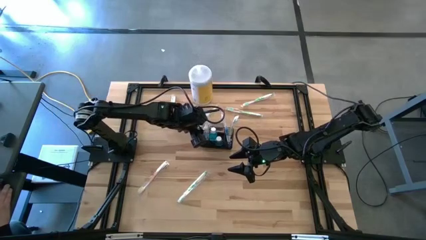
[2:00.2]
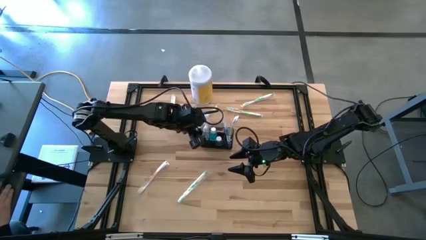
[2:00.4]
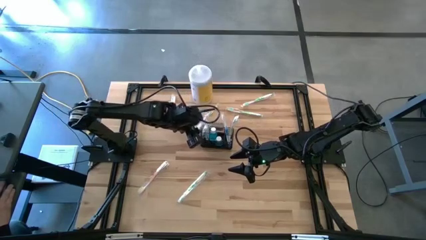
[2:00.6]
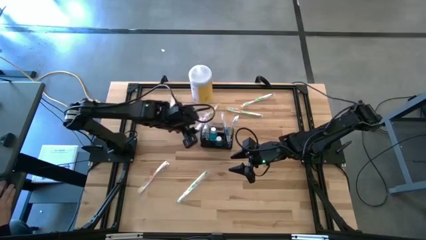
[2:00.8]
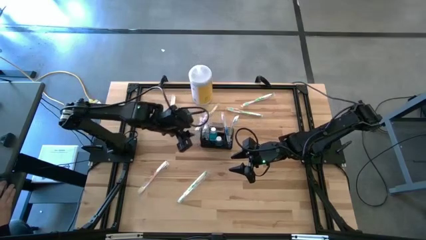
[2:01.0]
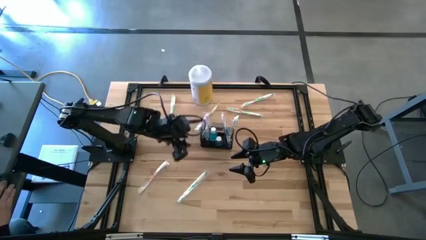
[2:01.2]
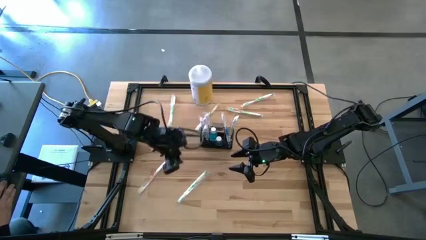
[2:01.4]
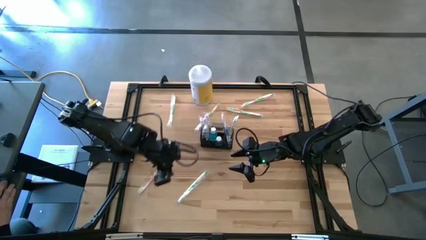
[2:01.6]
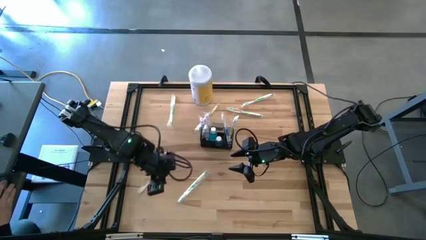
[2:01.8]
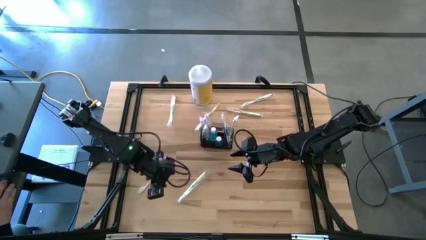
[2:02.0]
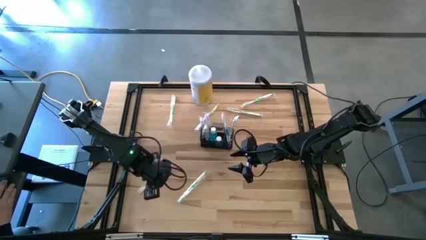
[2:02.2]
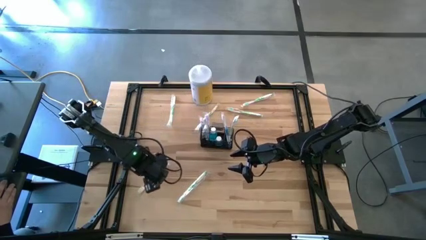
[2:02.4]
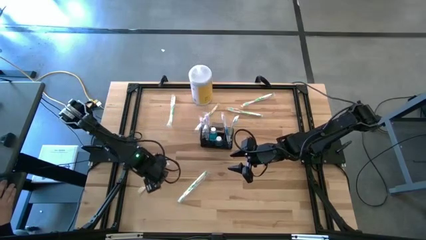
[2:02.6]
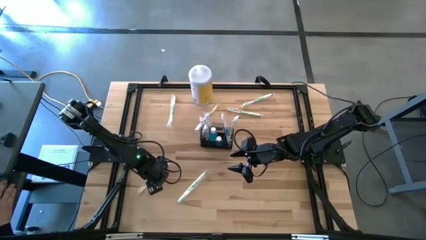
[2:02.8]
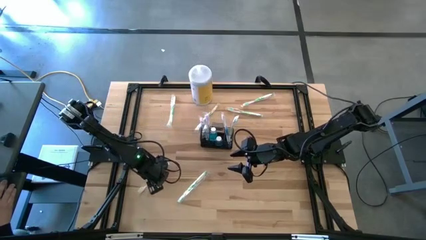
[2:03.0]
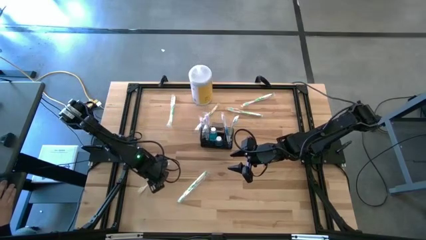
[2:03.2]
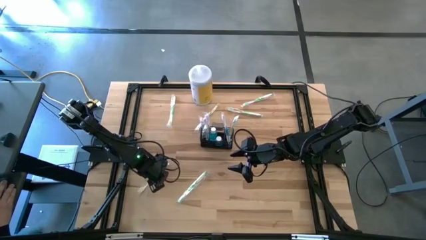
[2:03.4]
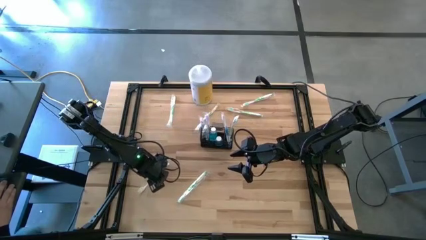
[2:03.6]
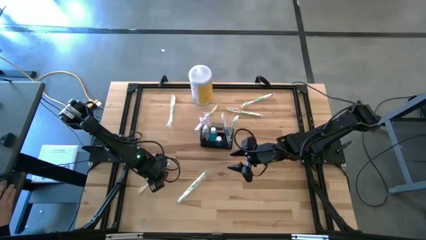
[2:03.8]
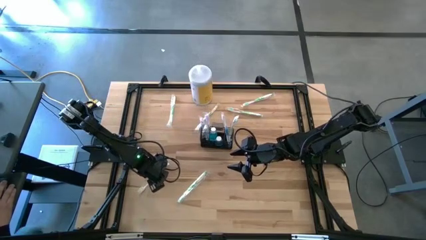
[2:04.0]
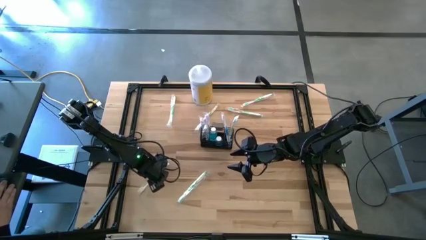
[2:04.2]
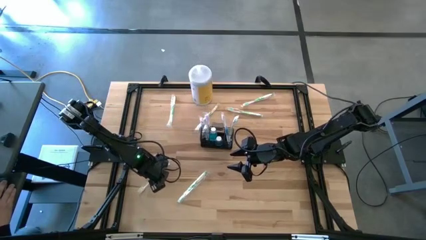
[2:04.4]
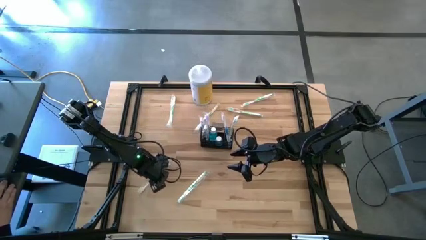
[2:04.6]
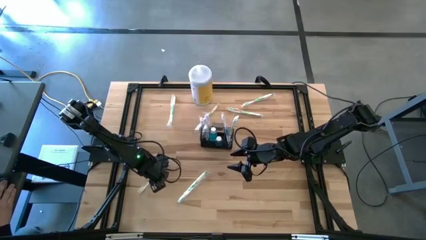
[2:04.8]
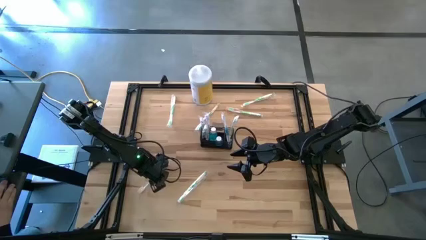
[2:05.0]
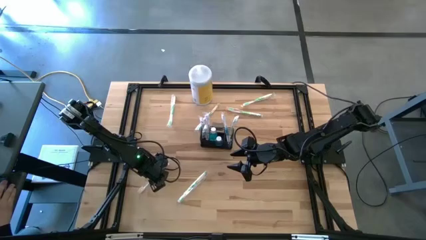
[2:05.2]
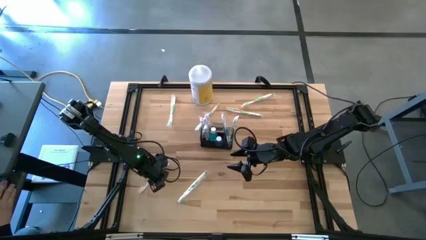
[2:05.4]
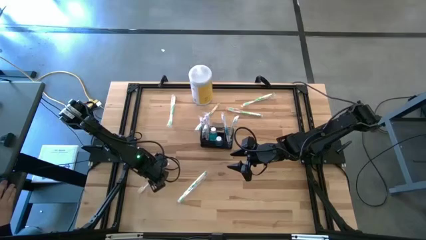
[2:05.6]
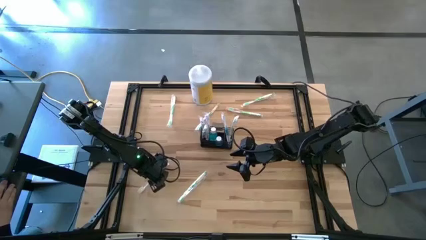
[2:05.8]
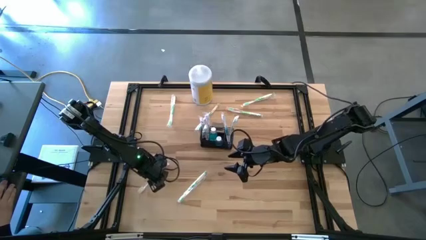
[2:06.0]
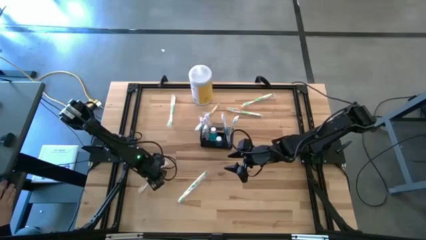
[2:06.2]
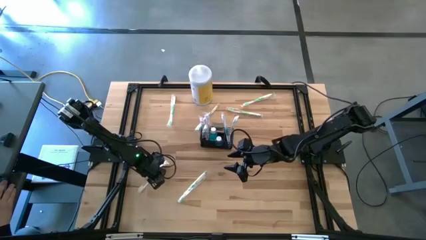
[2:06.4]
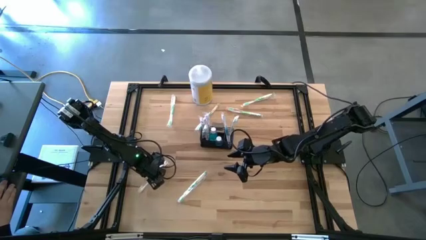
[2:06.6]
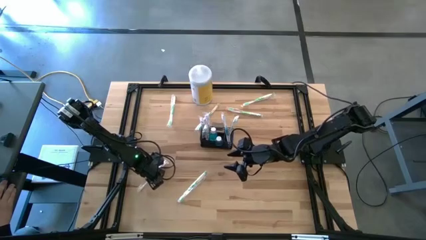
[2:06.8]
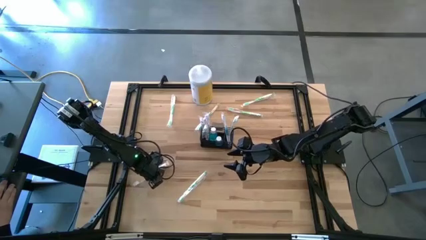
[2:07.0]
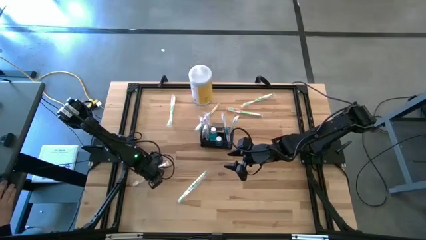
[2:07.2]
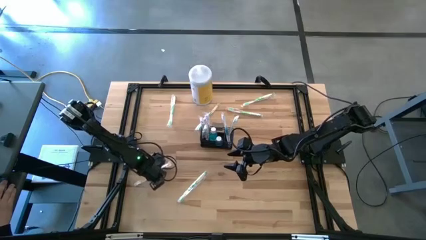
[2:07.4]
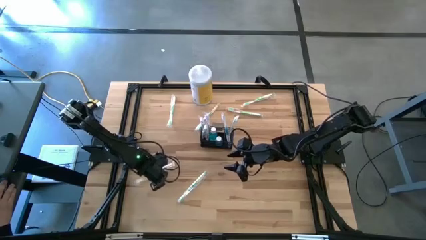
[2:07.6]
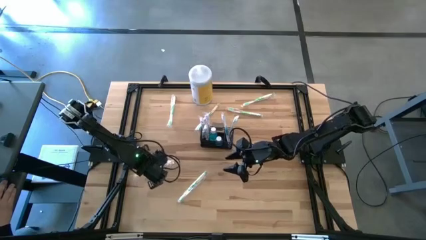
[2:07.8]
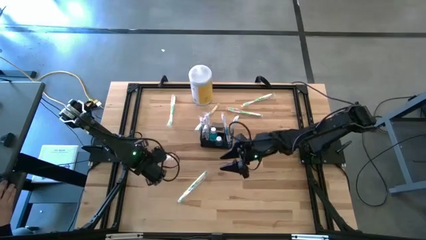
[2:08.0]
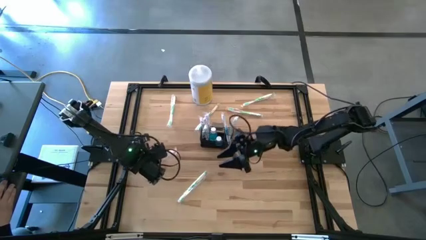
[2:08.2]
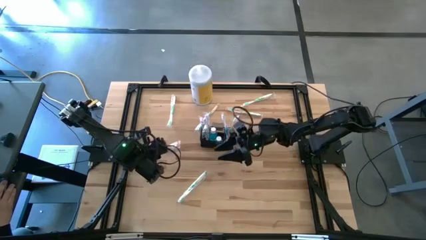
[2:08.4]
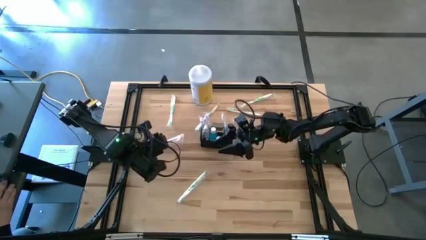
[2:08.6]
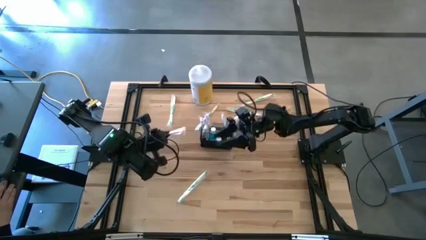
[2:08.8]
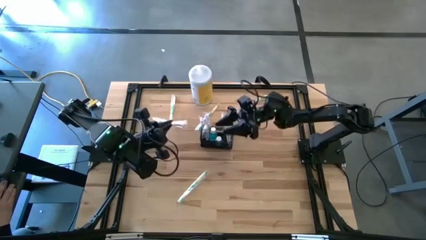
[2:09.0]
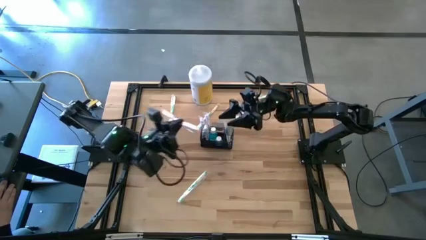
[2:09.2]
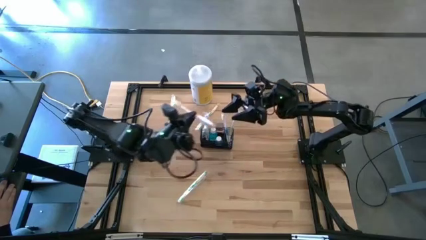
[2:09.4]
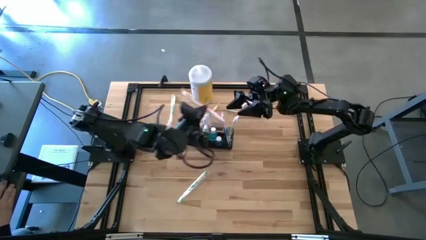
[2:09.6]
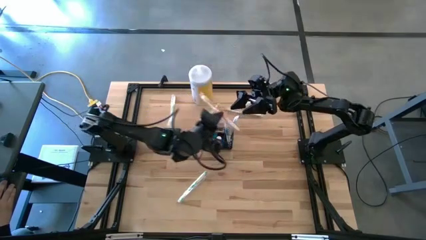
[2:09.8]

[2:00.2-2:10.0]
Task: Pick & Place toothbrushing station
Put the orange toothbrush into the right section wire organizer

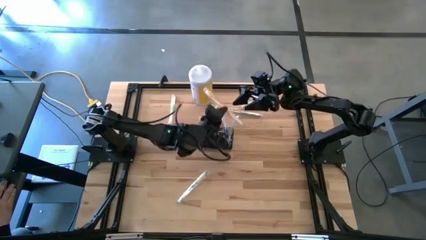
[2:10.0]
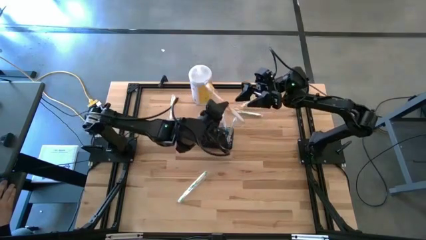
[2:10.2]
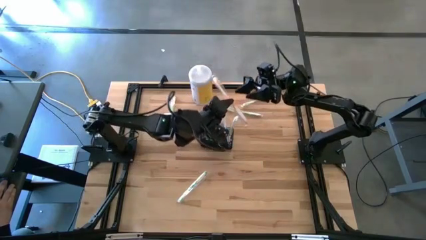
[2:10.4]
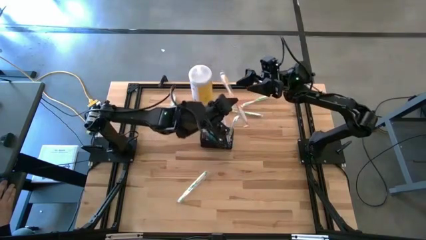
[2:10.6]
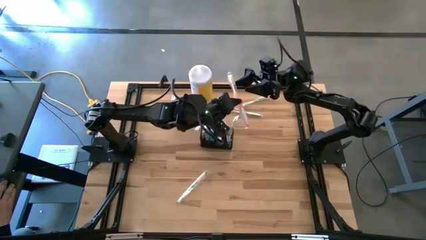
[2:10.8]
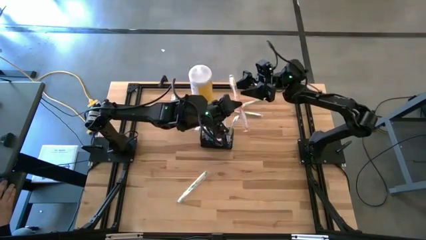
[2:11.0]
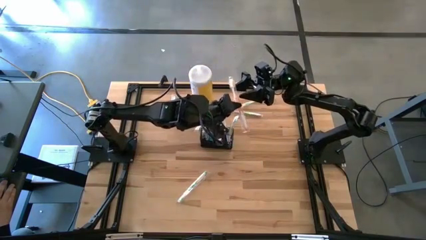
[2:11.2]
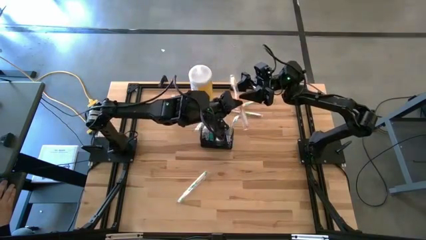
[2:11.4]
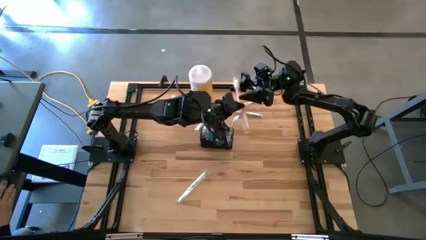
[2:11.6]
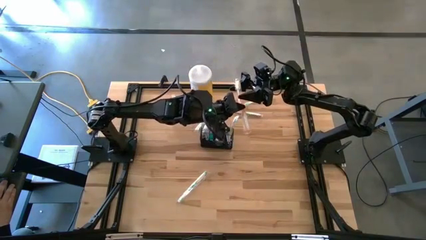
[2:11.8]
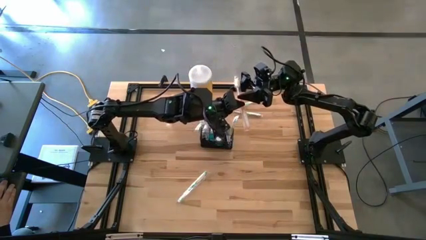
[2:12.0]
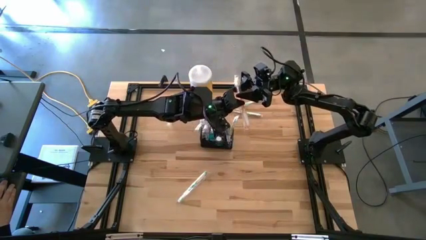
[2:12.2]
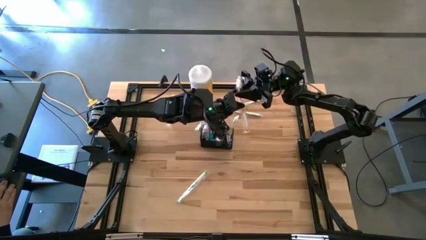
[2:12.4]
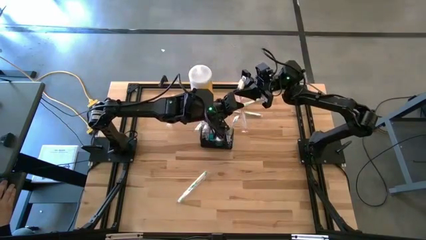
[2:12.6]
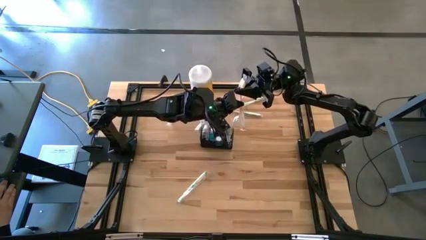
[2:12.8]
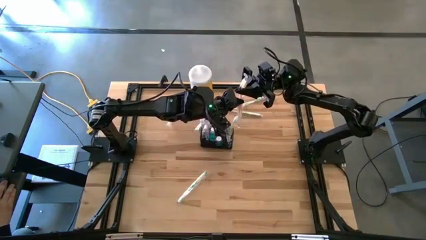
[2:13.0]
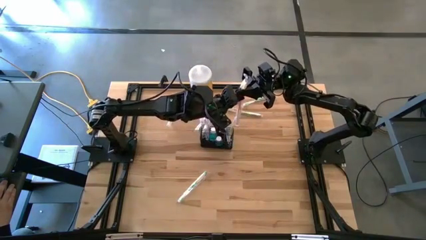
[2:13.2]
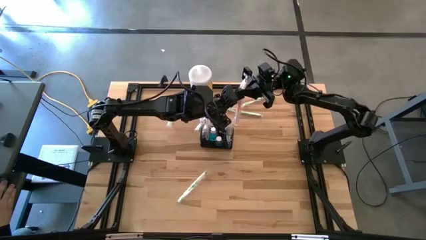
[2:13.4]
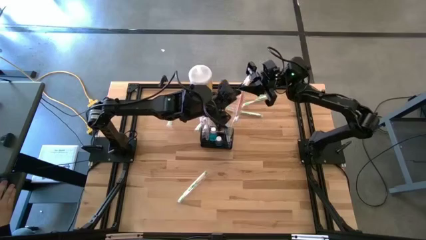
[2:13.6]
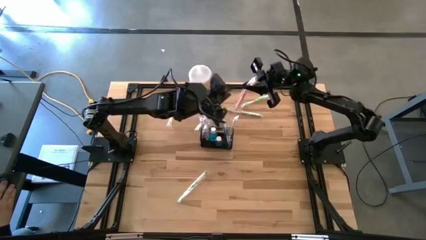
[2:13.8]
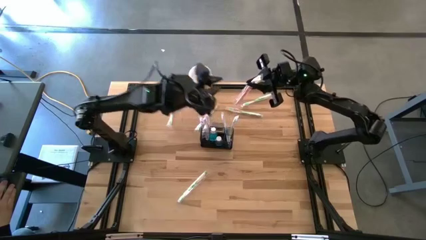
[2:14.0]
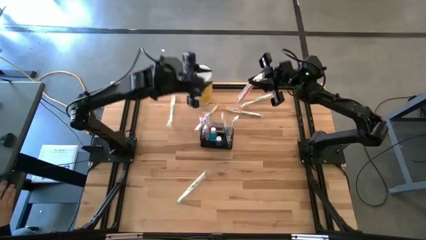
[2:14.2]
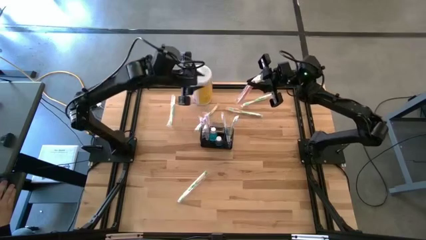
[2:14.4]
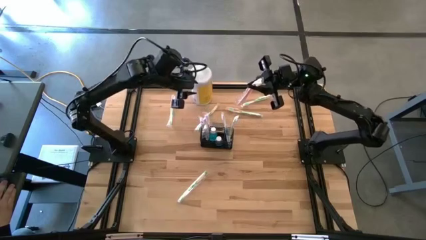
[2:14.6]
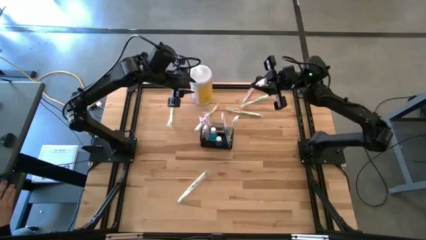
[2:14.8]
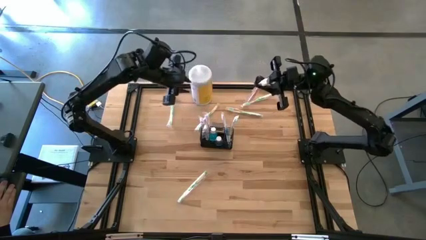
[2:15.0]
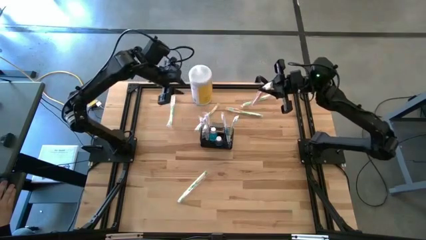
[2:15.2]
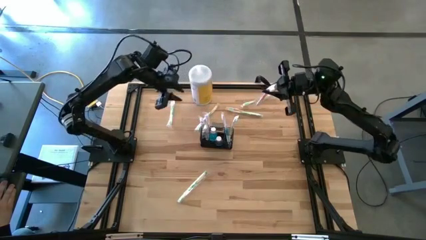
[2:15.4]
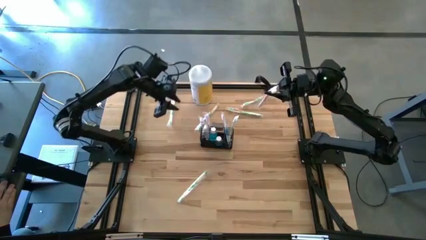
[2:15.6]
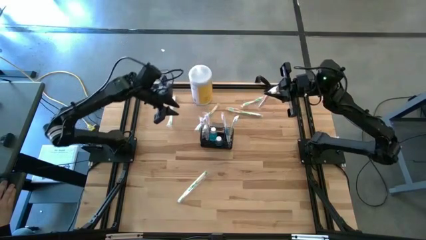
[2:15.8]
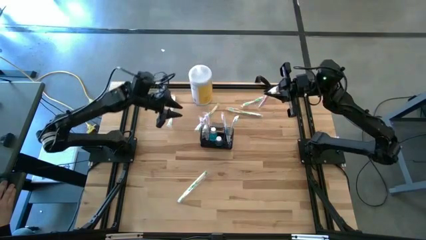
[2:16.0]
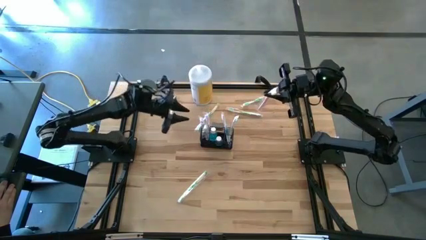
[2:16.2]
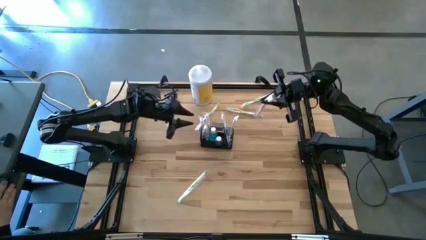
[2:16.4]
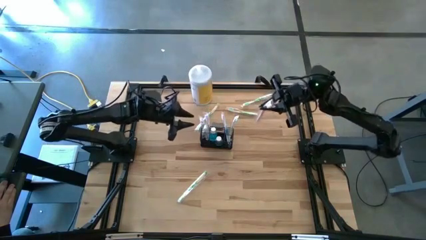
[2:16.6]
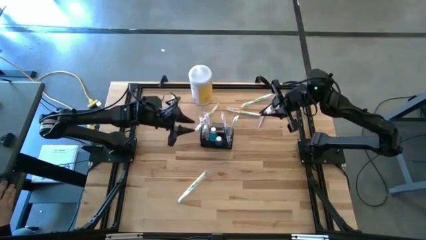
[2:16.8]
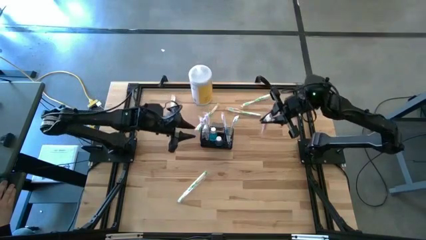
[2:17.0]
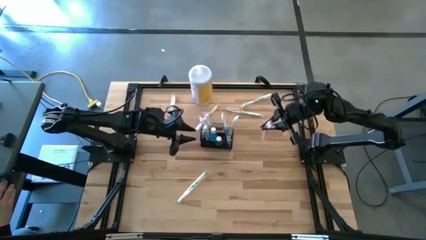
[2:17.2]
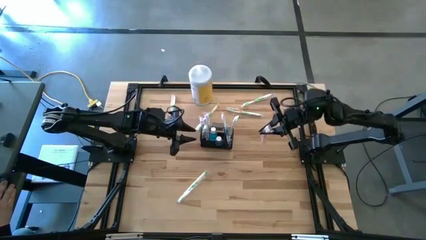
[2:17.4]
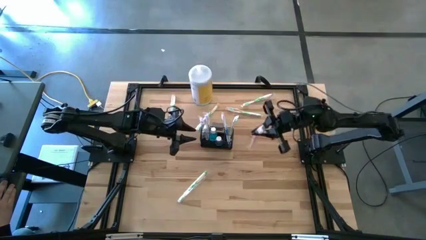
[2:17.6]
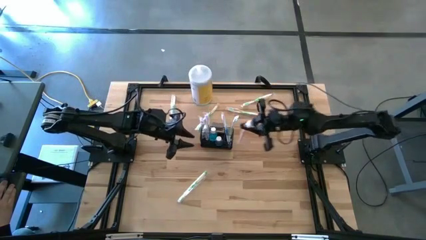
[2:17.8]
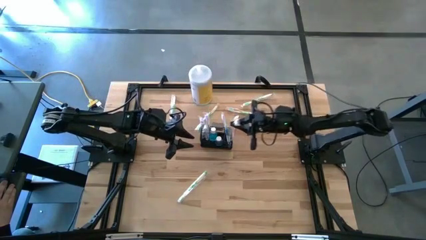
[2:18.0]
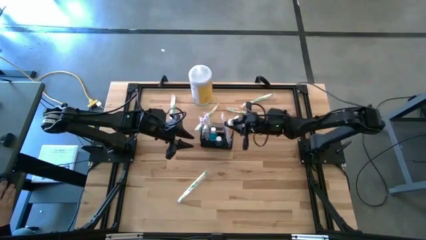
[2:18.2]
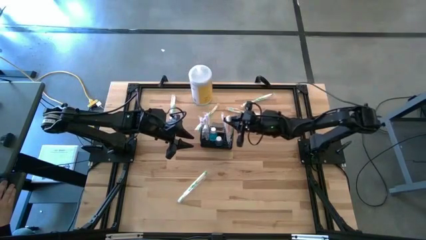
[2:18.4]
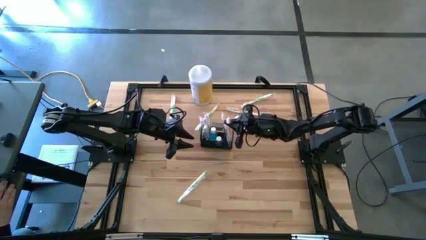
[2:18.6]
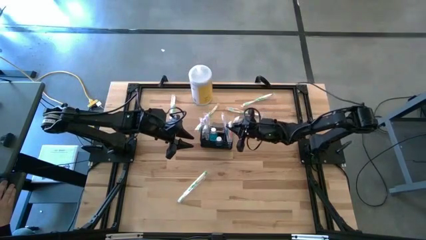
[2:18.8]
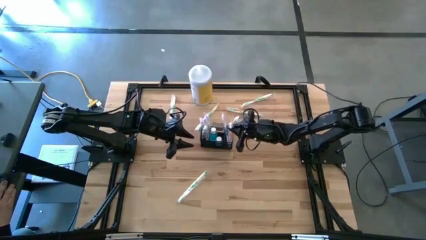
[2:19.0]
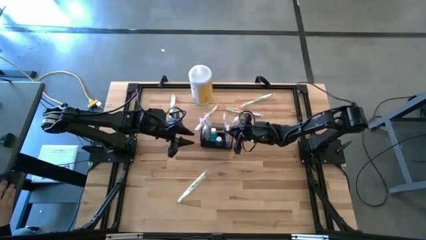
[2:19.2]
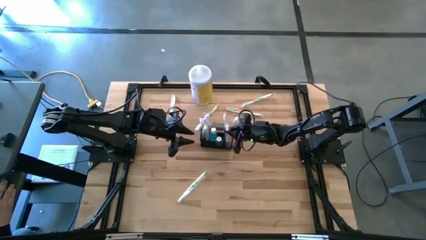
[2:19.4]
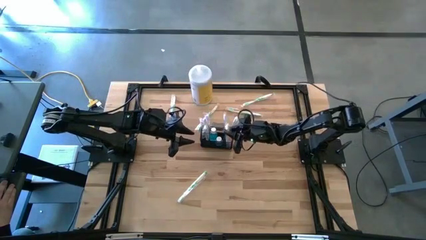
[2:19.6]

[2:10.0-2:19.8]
Put the orange toothbrush into the right section wire organizer
